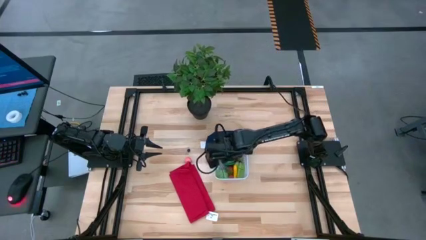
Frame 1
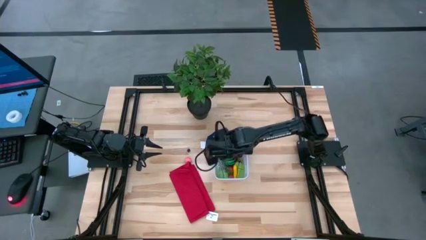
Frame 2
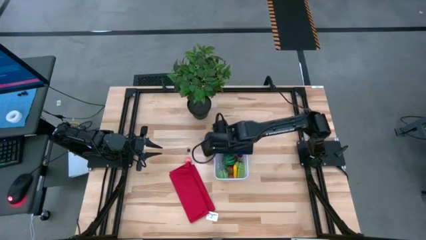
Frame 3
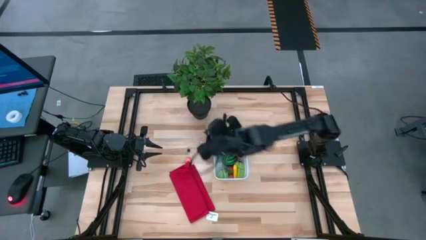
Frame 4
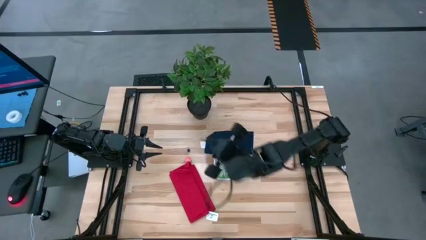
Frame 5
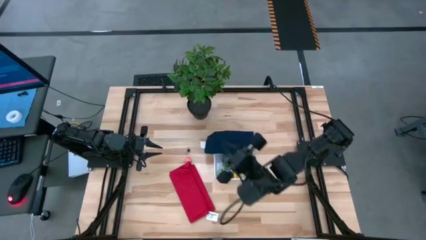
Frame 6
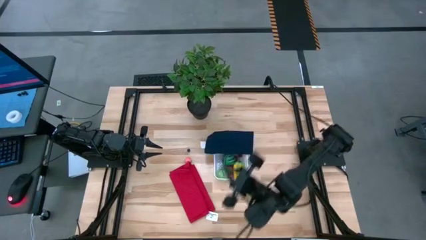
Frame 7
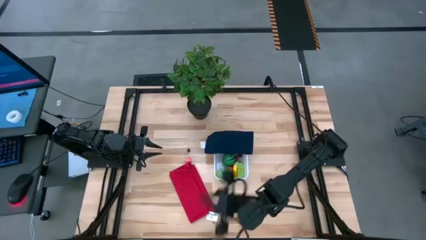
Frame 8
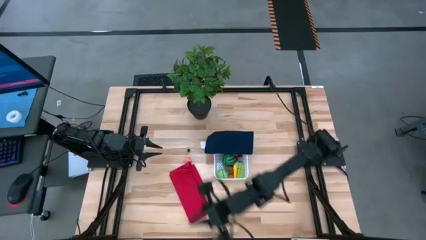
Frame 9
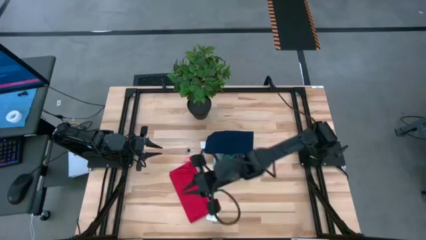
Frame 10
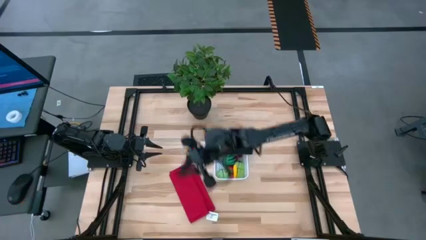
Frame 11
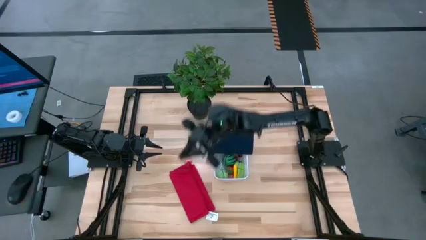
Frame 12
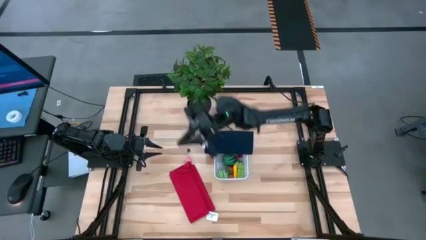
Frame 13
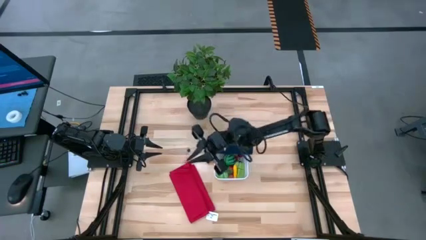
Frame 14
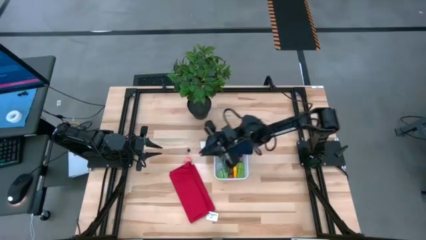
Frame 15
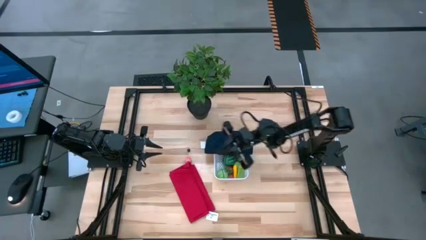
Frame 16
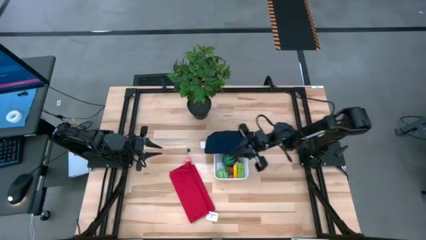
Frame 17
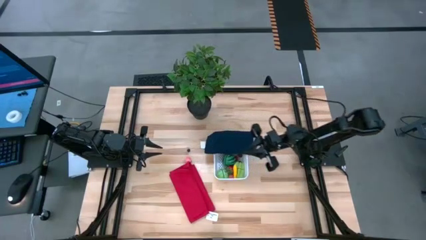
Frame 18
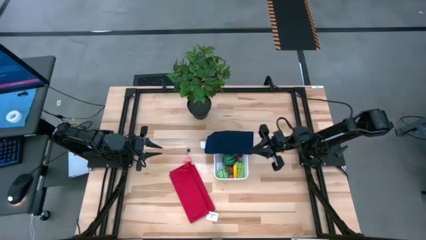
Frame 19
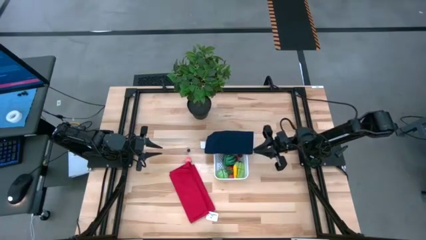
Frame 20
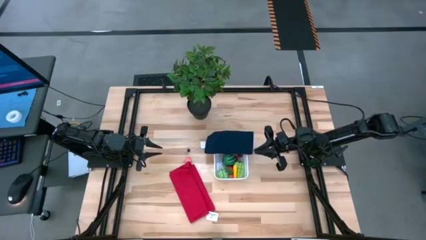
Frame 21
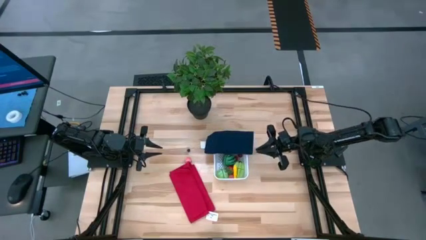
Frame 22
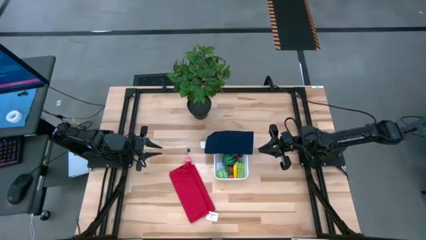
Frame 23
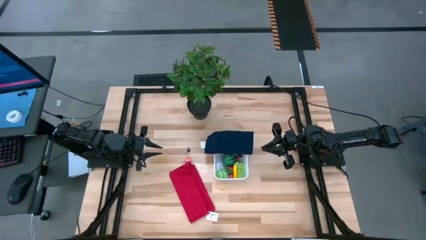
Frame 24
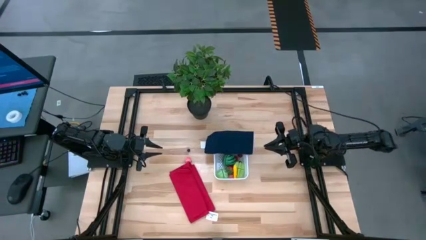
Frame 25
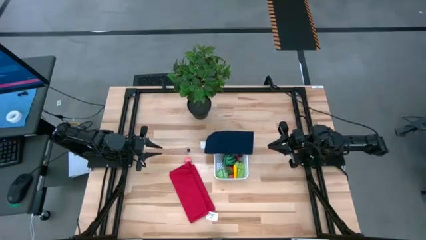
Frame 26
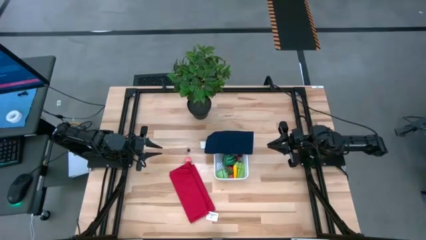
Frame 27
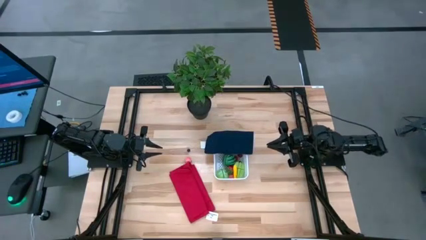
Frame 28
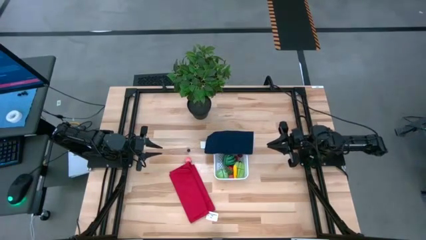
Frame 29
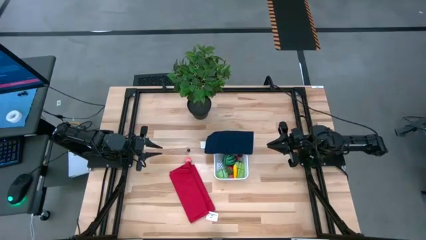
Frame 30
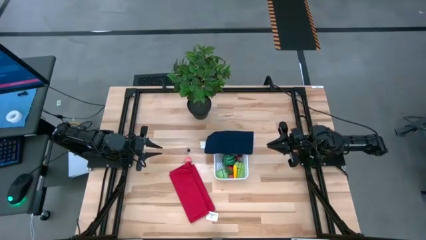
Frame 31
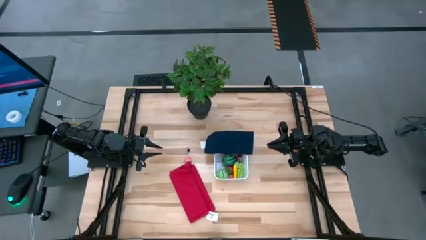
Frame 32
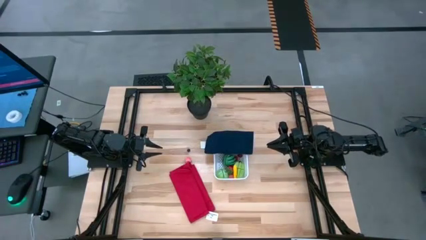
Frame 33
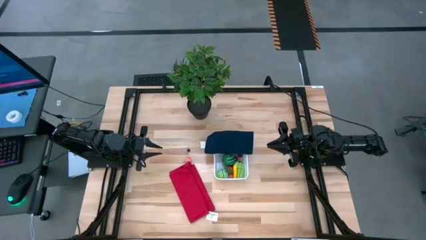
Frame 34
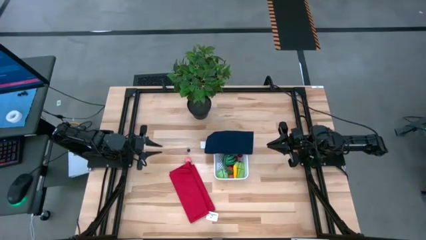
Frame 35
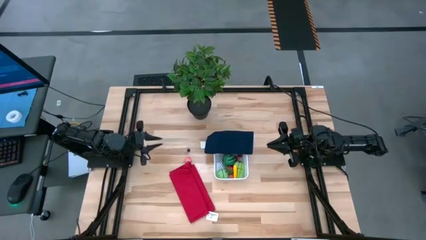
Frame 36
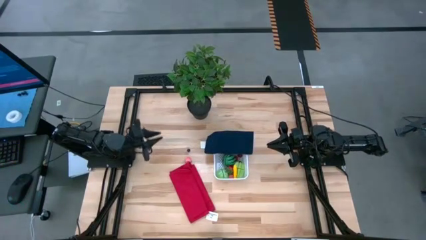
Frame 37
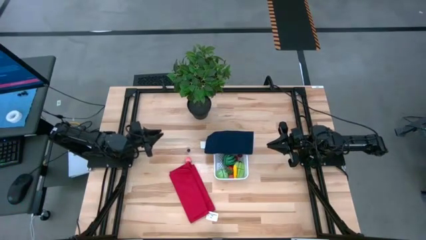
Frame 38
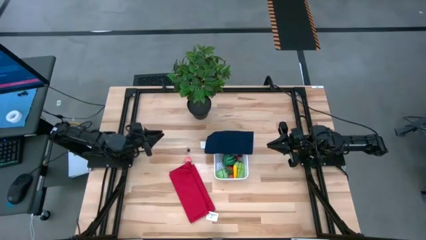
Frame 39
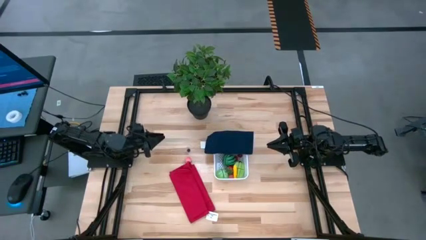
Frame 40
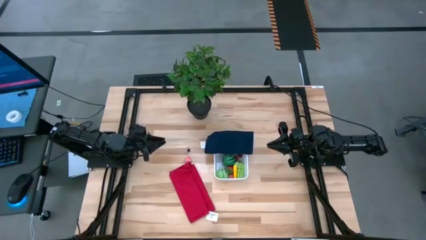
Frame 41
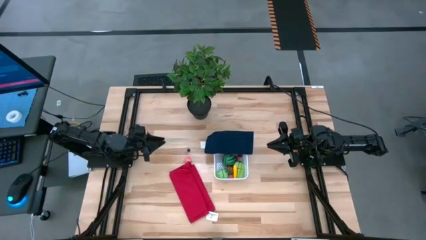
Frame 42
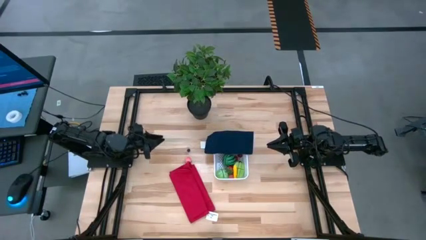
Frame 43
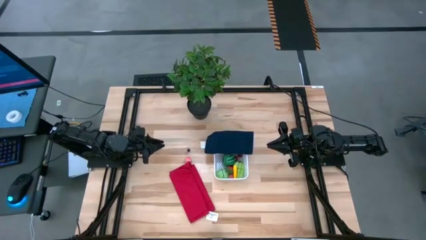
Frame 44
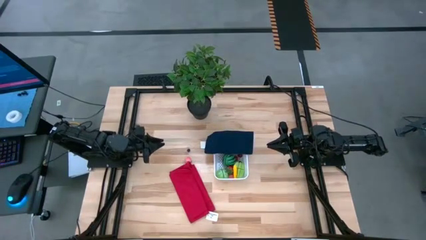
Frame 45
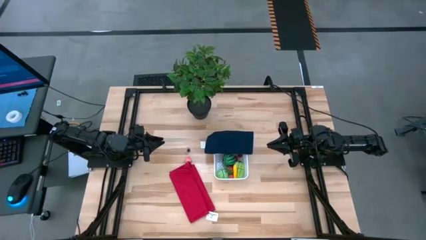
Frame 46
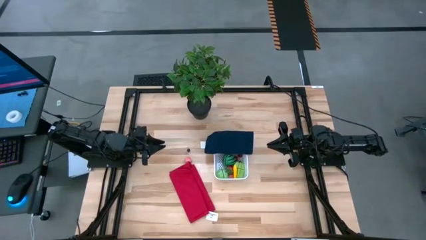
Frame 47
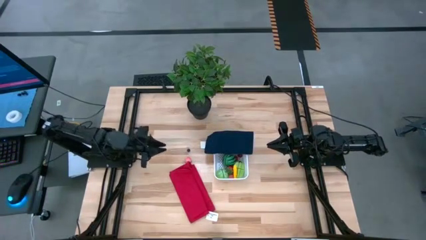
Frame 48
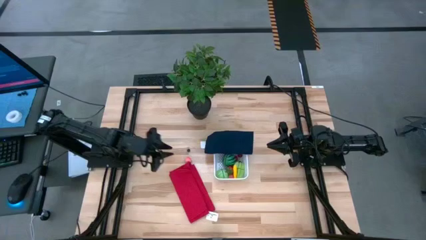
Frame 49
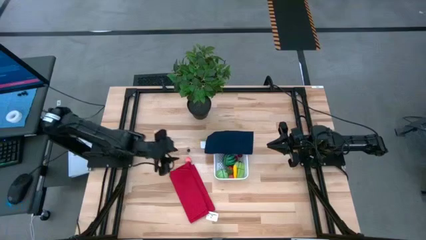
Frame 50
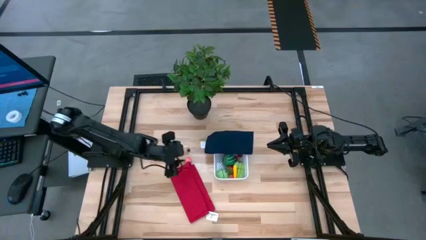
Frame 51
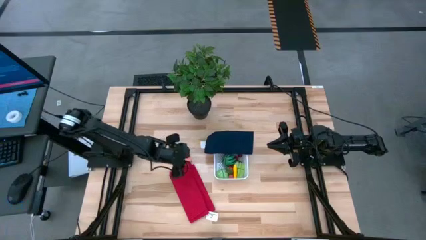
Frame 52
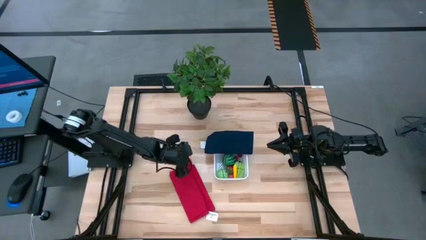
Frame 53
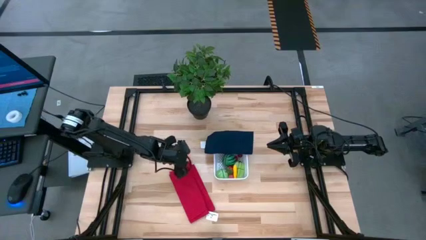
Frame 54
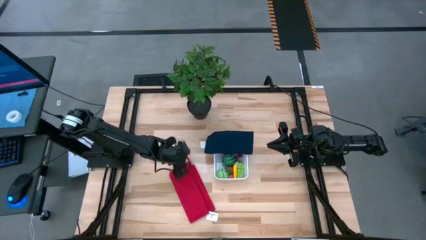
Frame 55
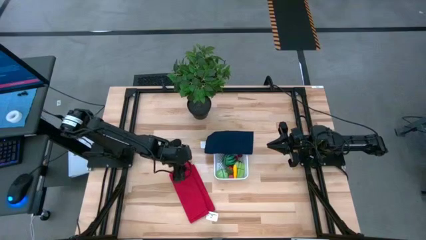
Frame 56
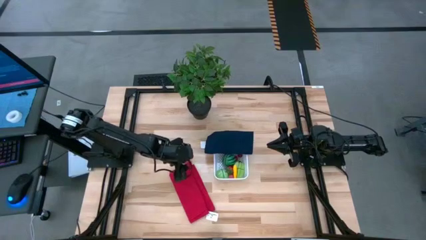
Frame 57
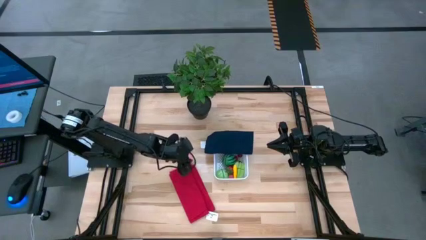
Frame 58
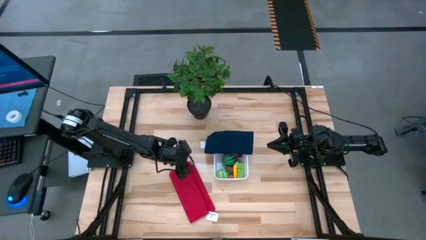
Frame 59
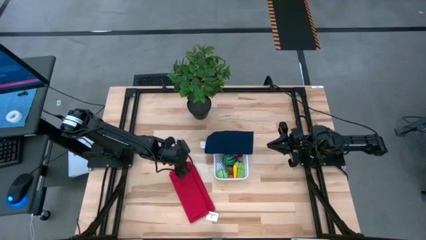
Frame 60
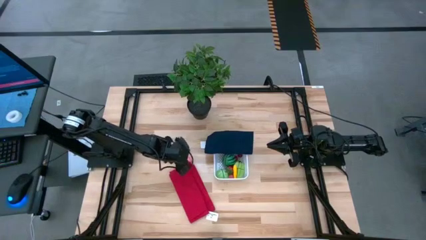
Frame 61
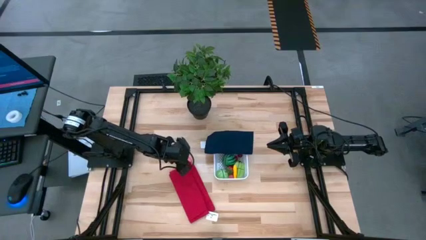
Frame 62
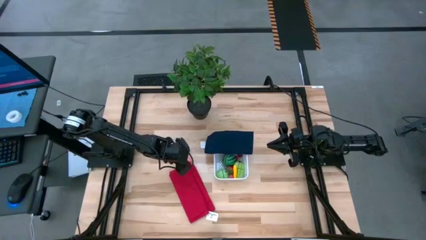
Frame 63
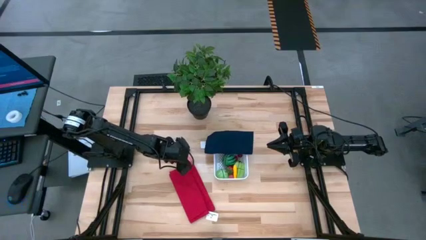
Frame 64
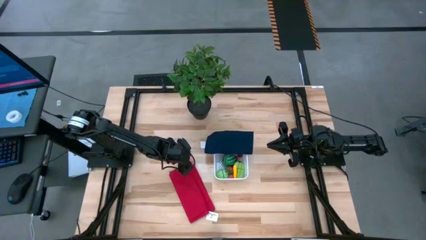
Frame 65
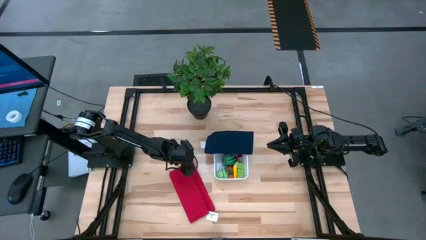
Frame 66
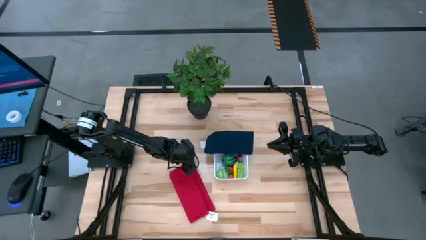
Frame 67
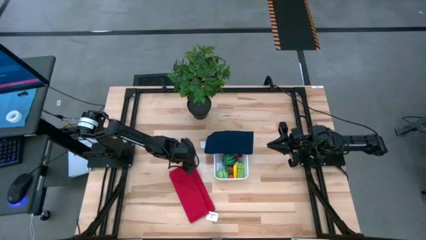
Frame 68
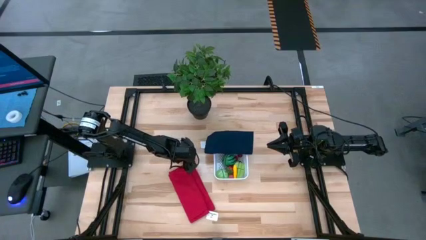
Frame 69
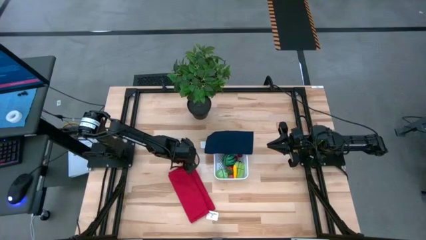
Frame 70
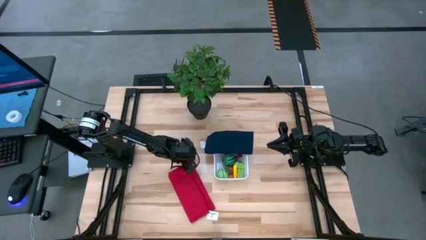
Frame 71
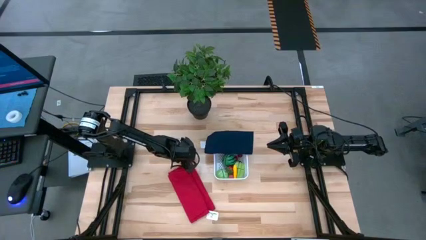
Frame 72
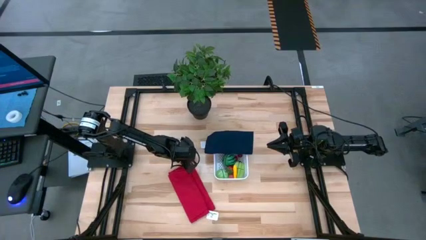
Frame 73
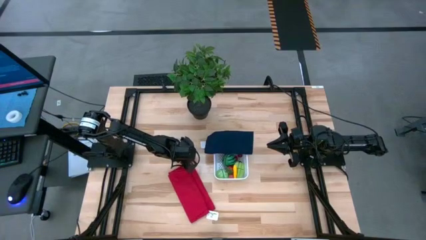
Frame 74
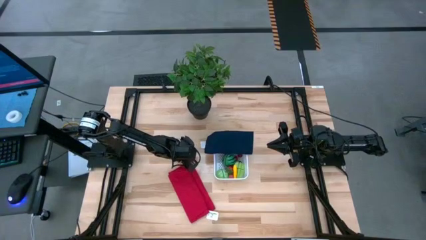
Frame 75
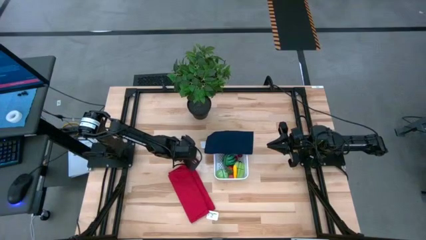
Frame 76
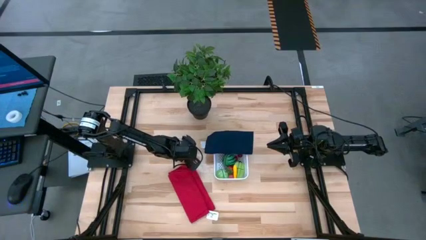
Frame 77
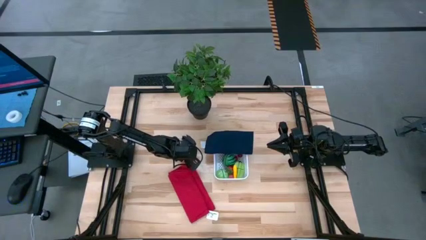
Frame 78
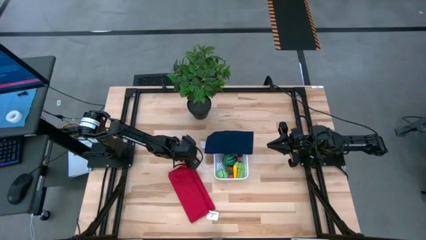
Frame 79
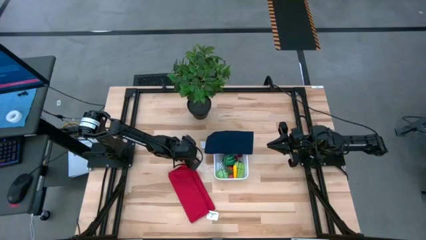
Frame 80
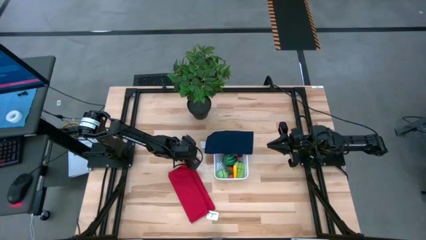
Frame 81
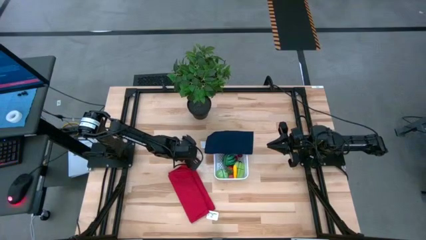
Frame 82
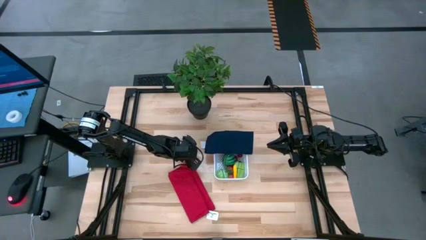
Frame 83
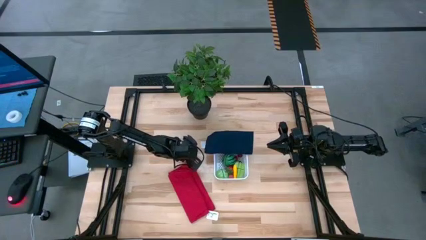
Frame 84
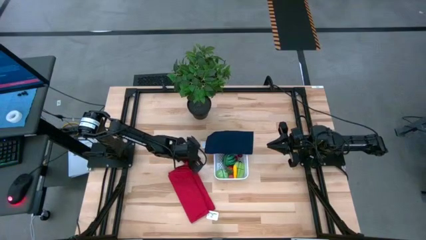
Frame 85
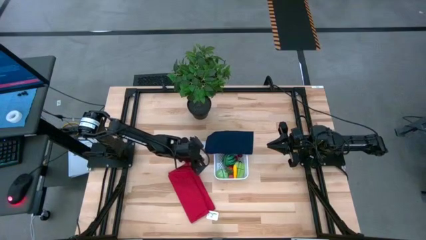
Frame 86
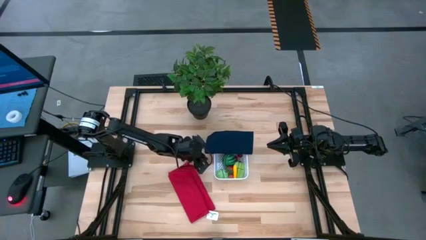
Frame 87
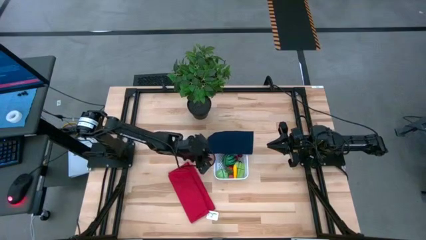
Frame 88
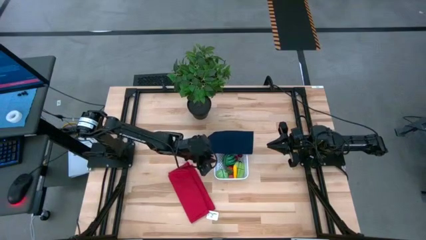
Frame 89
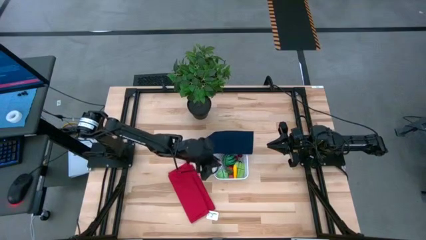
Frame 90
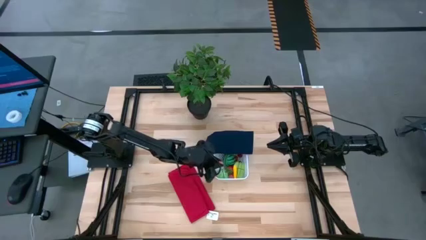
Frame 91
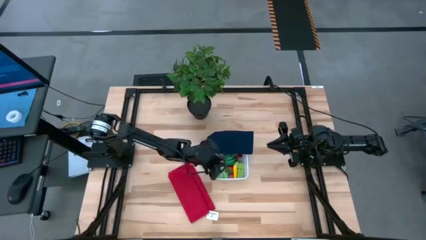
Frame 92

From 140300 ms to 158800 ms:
Task: Pick and placing Produce into tupperware
Put the peach into the bin
